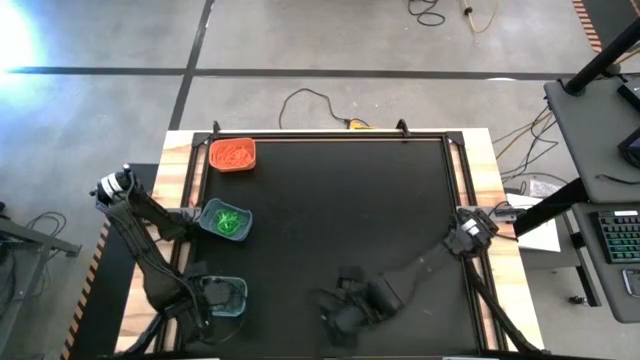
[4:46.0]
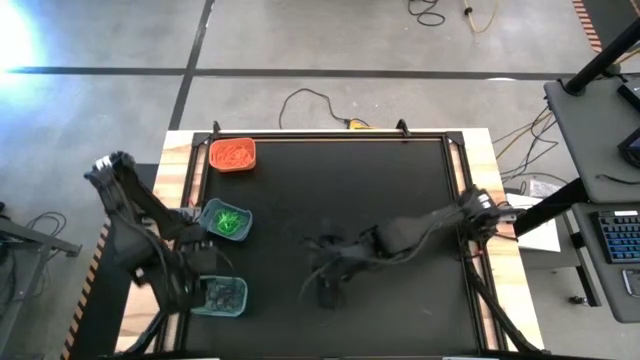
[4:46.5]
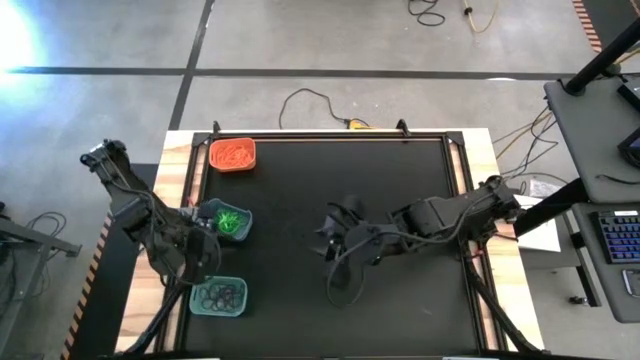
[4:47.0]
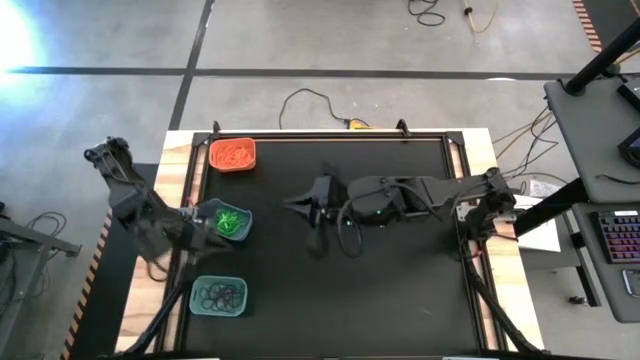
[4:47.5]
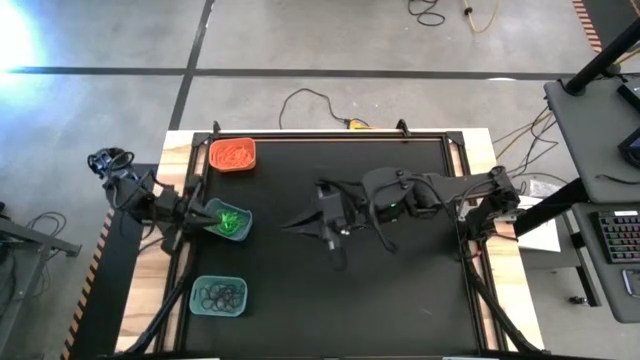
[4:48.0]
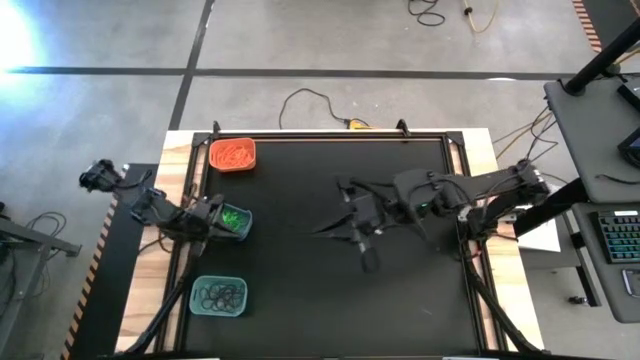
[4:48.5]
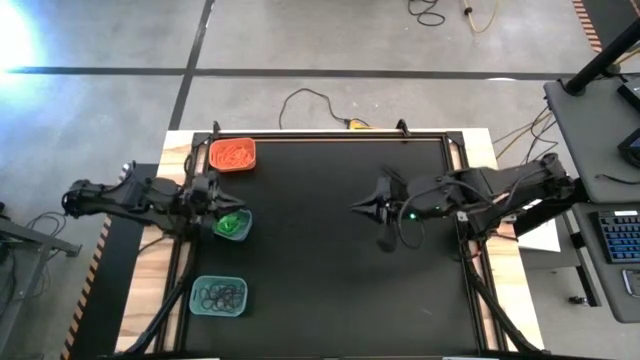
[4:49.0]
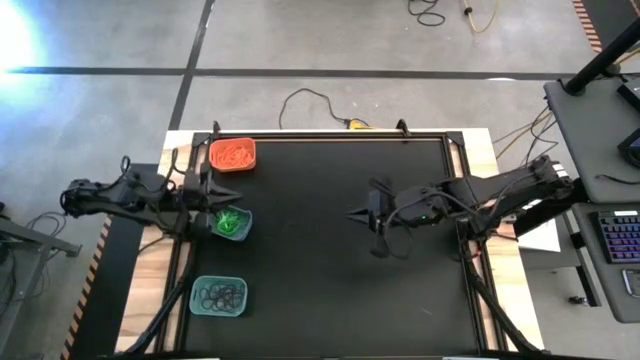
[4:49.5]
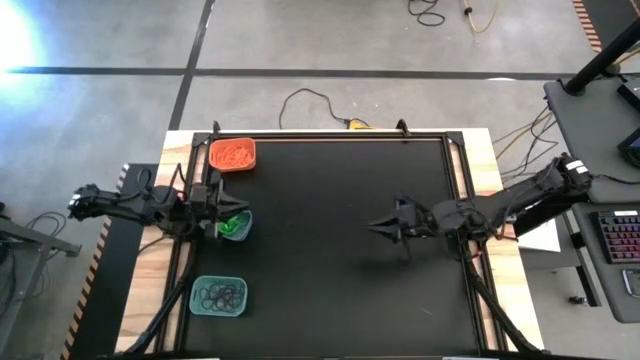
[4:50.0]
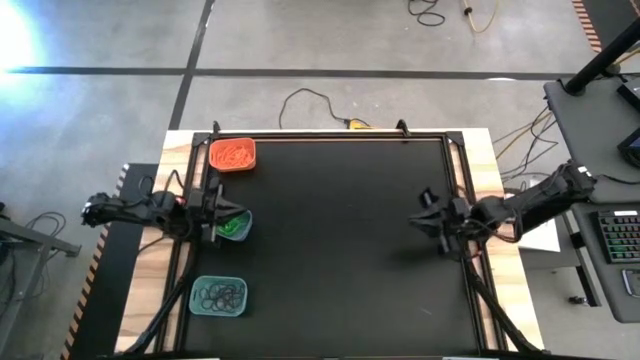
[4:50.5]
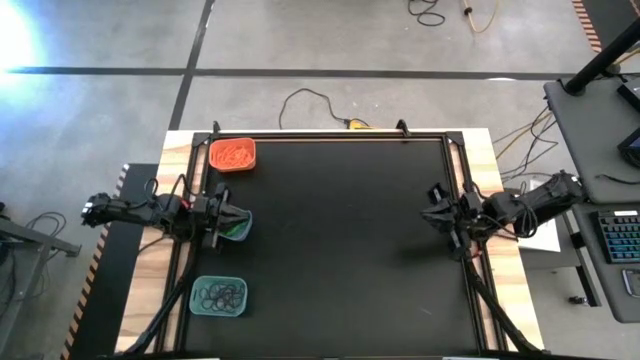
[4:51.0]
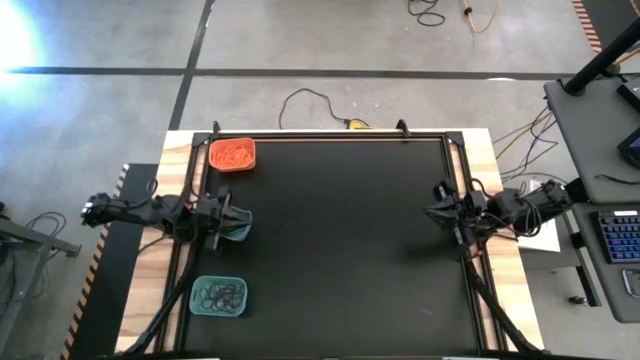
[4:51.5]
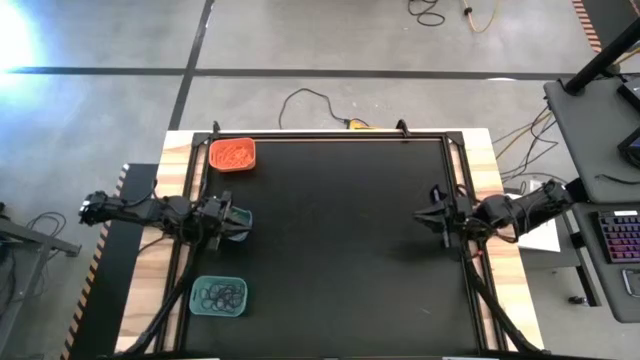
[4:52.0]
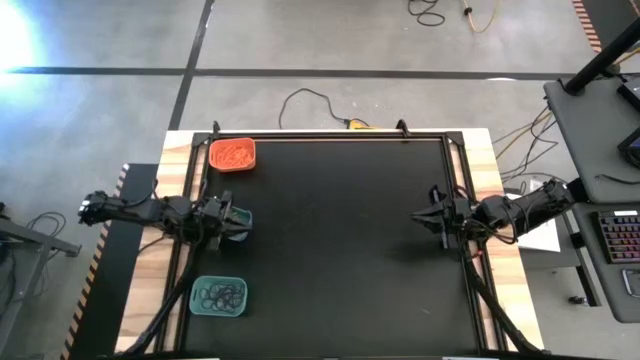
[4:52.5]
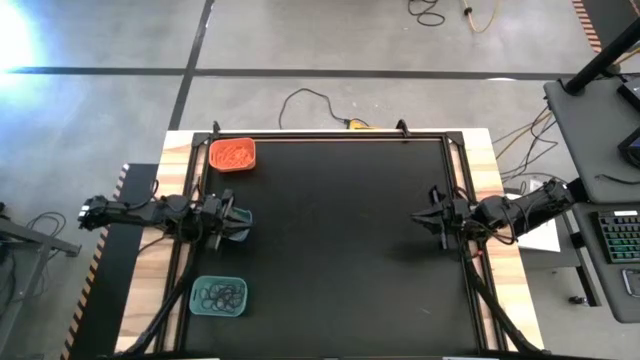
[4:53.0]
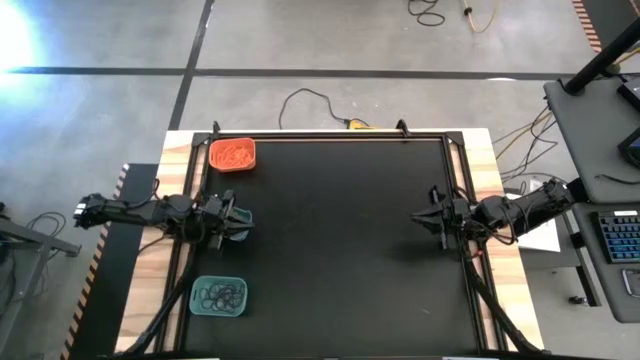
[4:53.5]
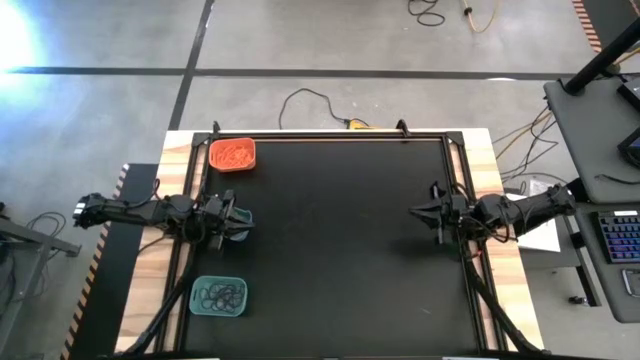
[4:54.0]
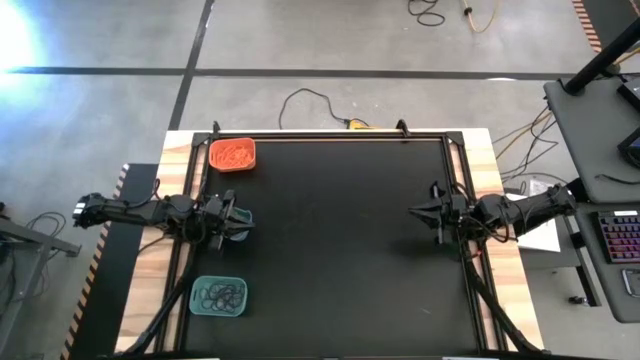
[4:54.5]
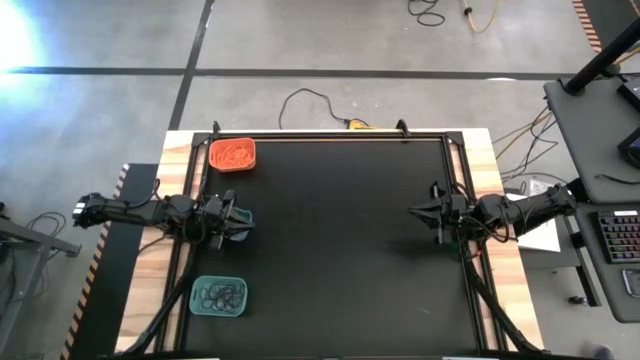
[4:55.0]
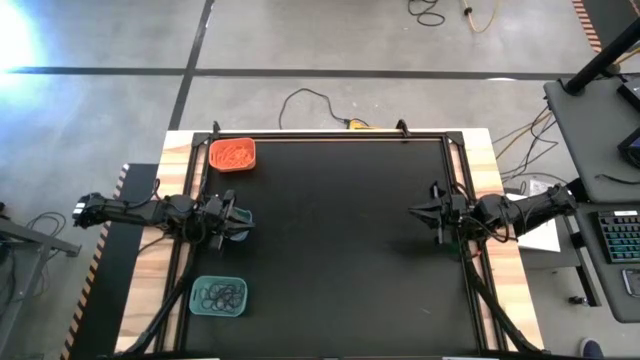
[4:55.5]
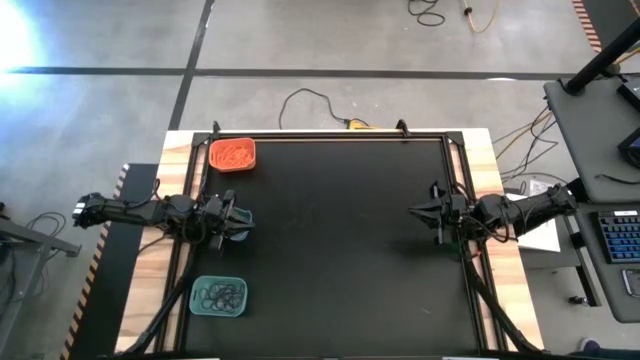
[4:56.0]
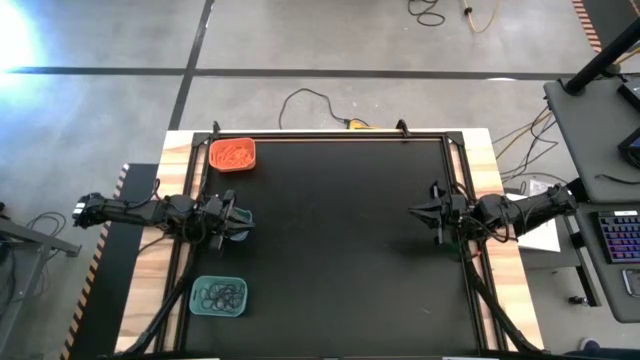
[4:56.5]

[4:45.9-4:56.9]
Task: Sort rubber bands into baskets
Return to Home Position

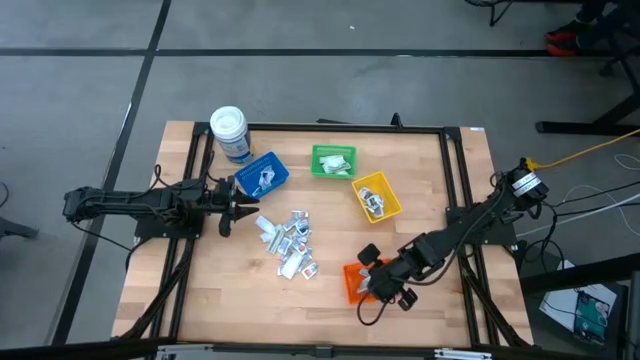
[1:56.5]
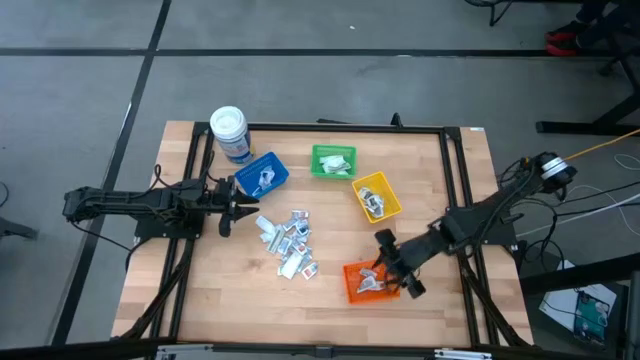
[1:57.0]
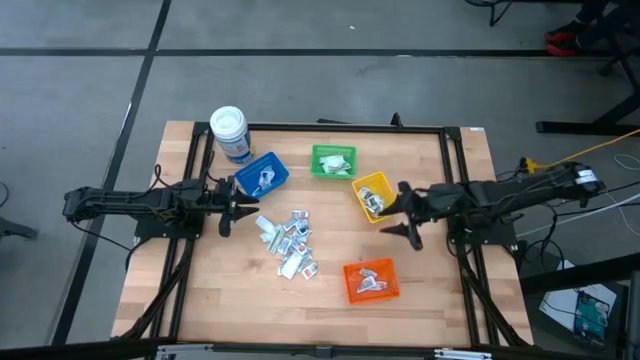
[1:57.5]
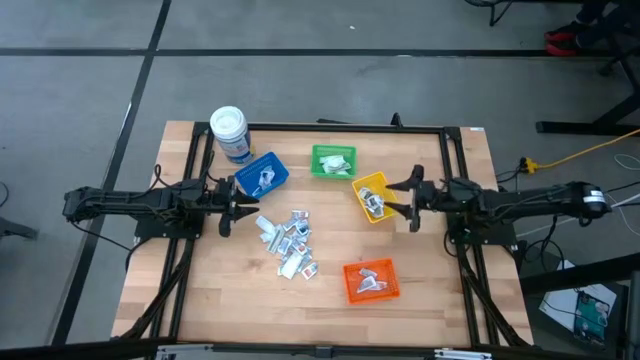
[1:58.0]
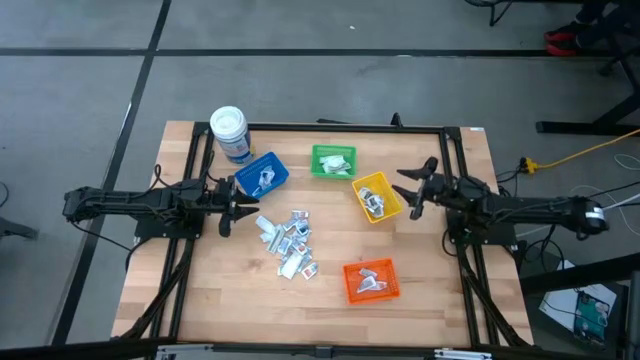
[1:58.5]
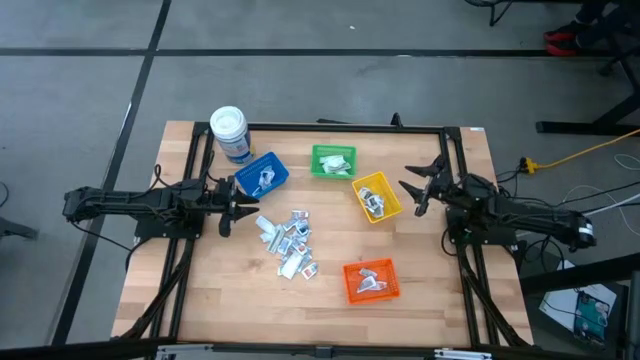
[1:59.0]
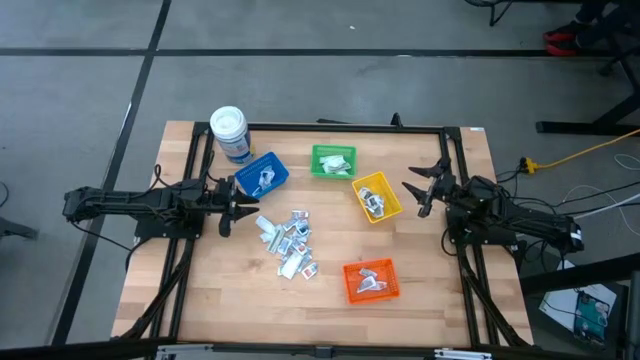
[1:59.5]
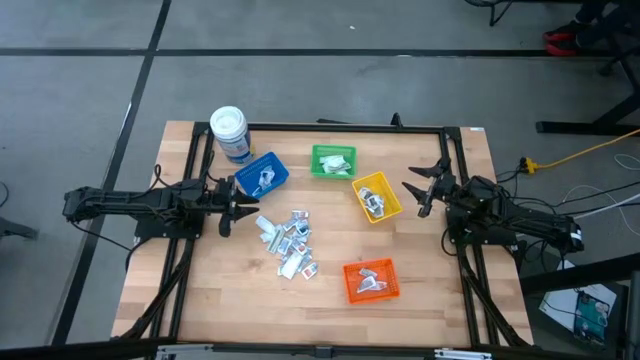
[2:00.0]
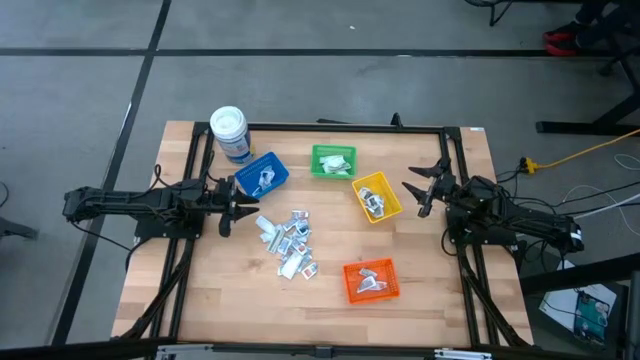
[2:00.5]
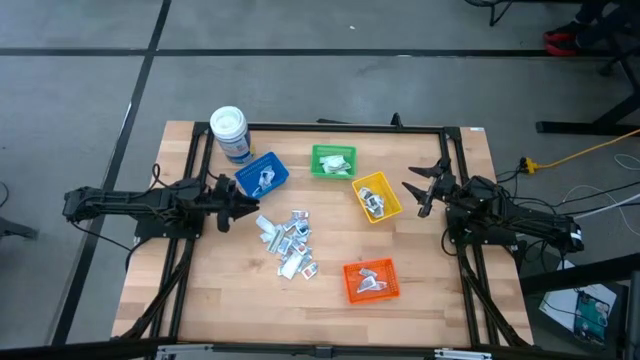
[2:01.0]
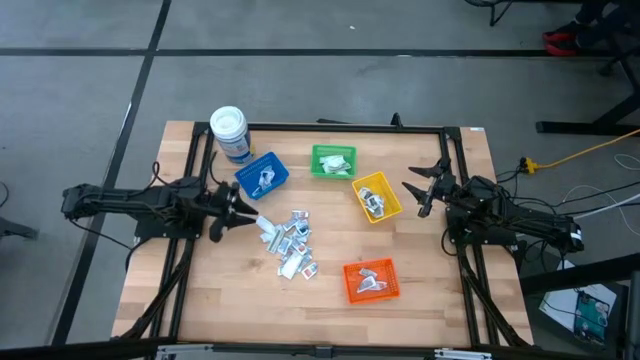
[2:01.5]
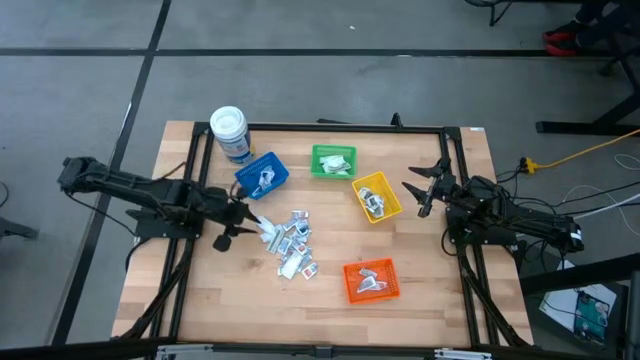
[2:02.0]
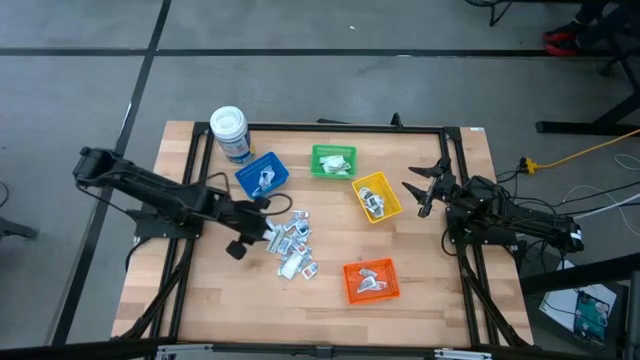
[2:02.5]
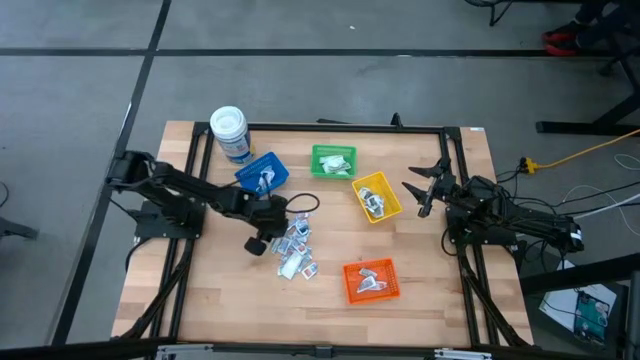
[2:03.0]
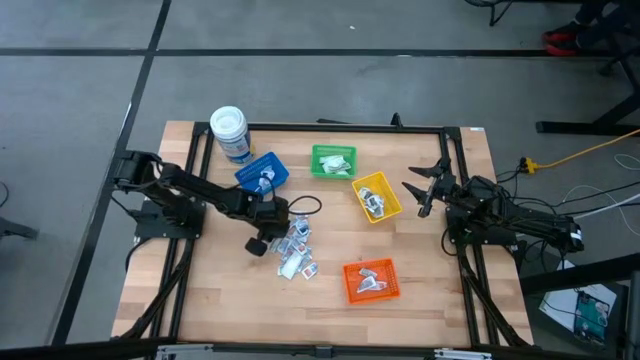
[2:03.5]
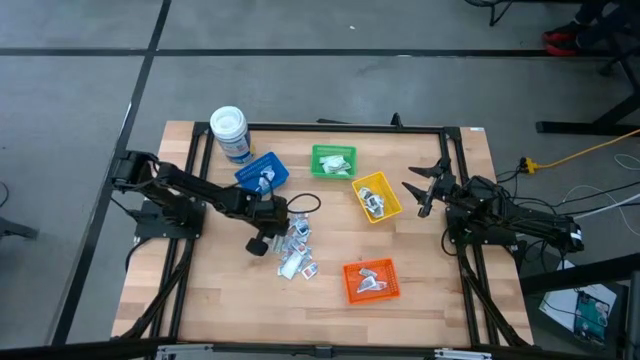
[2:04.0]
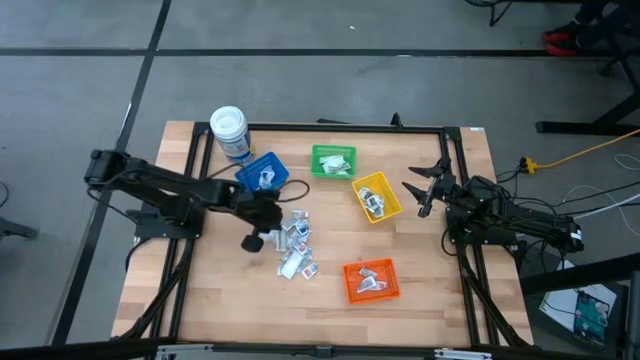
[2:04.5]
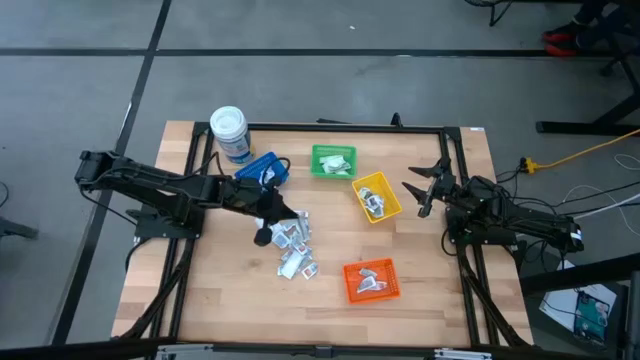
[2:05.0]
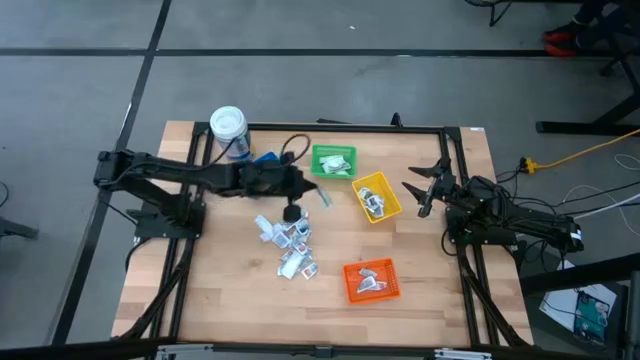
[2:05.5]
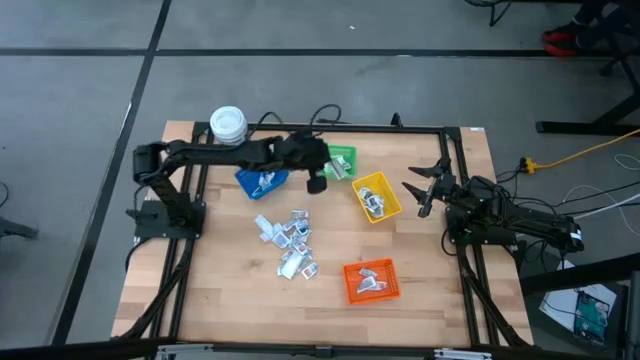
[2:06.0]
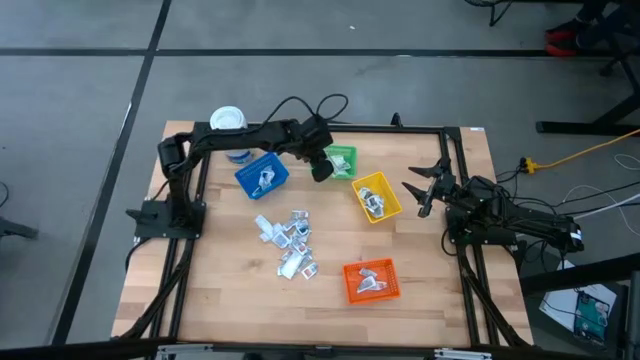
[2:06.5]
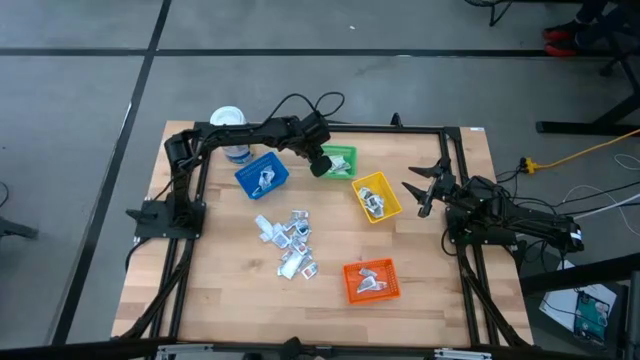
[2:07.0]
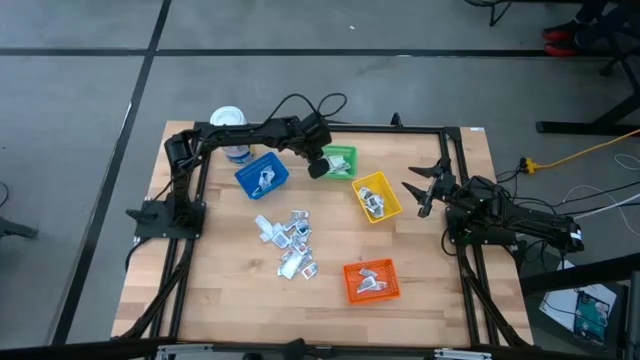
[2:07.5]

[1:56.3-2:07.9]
Task: Pick & Place First Aid Supplies
Put the white bandage into the green bin
